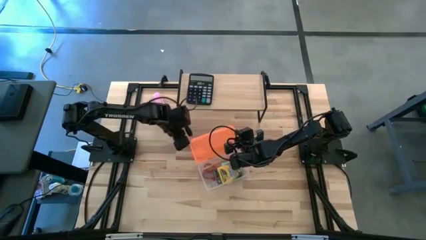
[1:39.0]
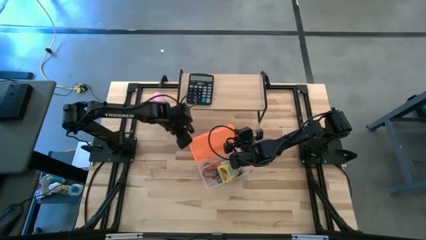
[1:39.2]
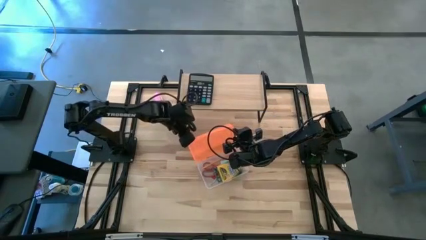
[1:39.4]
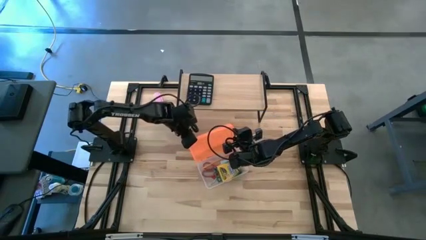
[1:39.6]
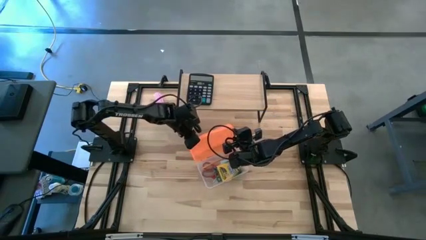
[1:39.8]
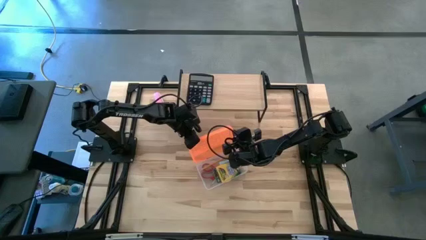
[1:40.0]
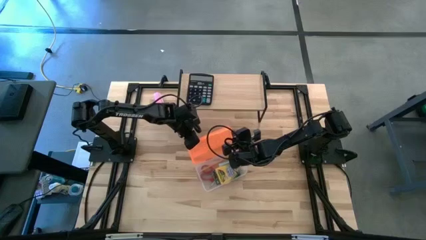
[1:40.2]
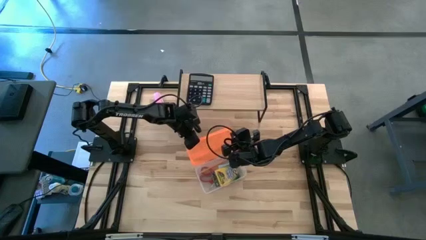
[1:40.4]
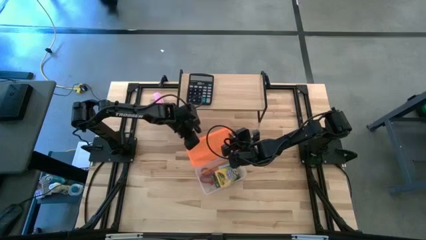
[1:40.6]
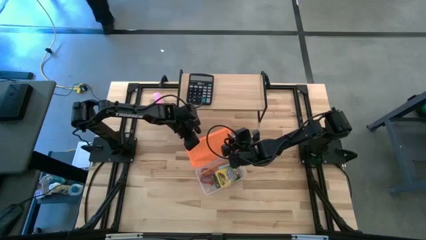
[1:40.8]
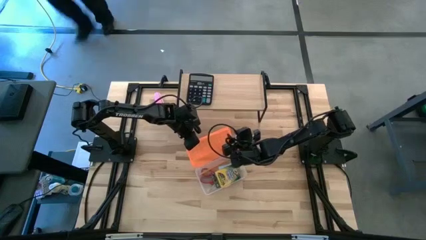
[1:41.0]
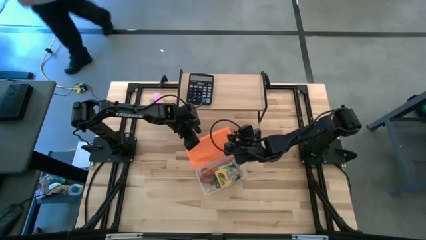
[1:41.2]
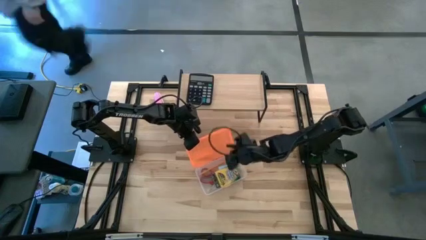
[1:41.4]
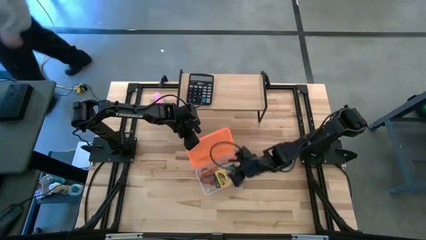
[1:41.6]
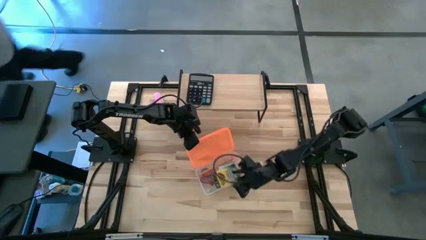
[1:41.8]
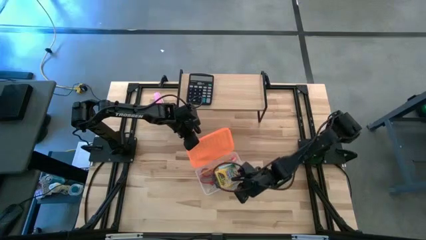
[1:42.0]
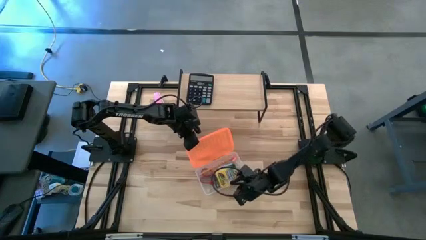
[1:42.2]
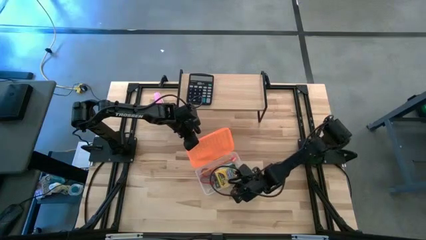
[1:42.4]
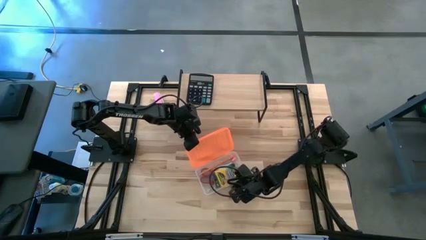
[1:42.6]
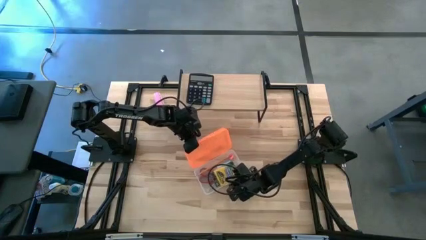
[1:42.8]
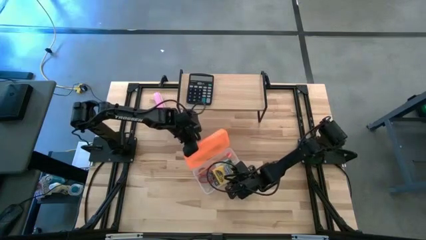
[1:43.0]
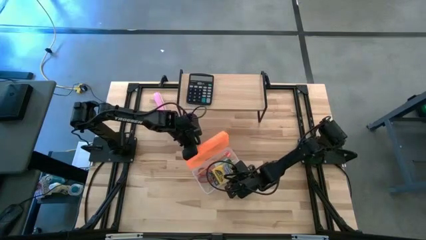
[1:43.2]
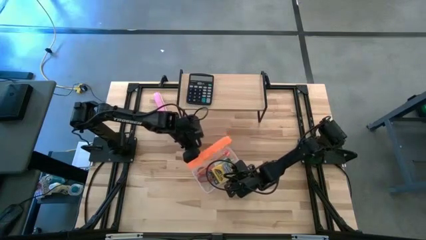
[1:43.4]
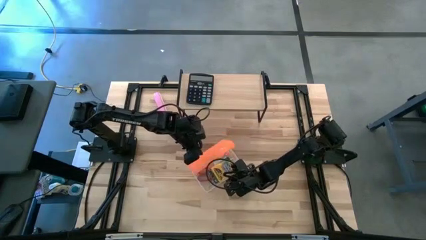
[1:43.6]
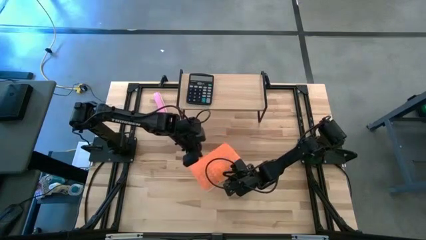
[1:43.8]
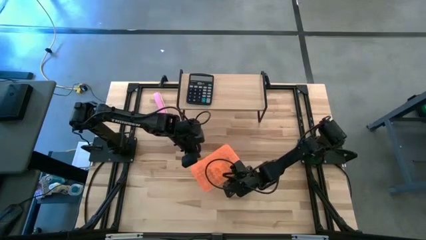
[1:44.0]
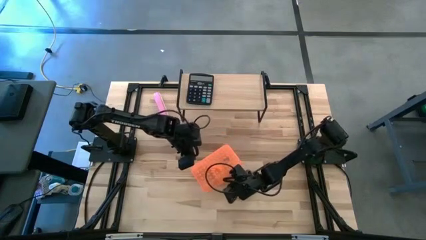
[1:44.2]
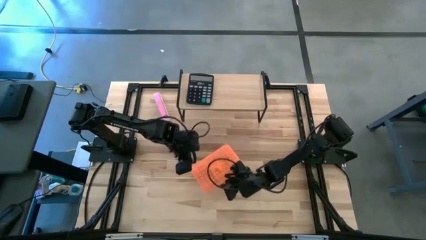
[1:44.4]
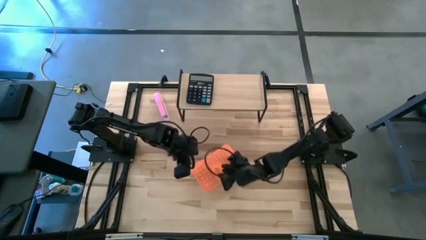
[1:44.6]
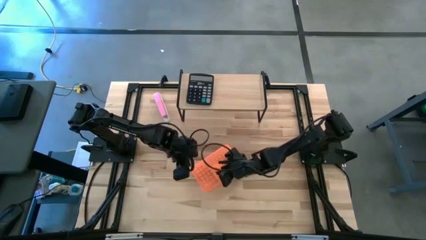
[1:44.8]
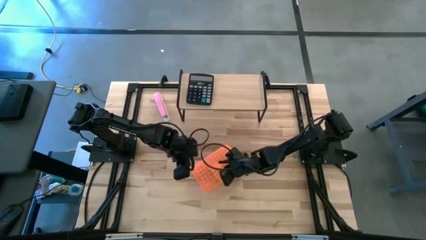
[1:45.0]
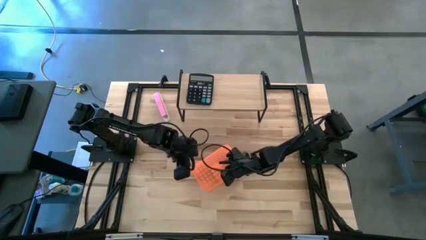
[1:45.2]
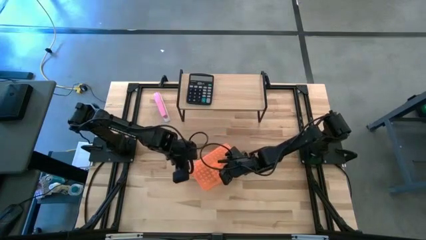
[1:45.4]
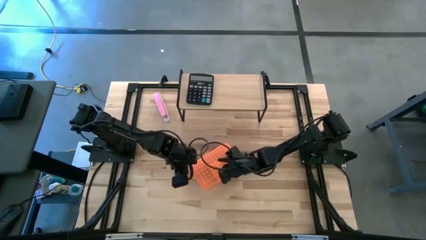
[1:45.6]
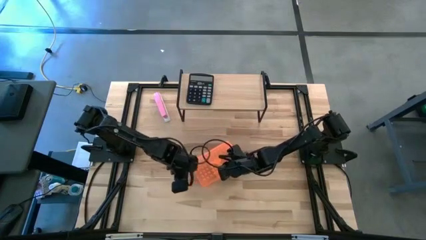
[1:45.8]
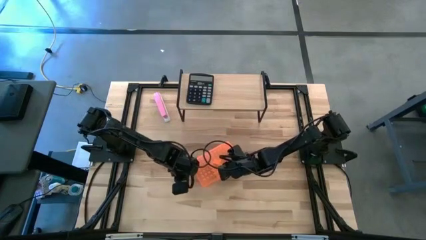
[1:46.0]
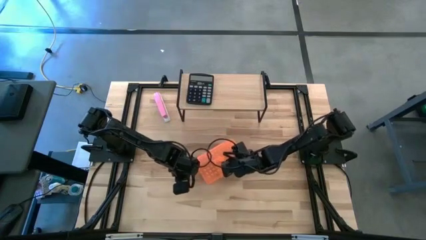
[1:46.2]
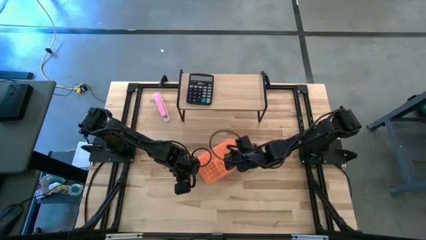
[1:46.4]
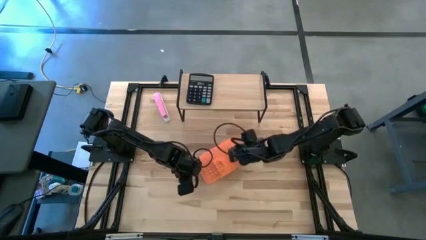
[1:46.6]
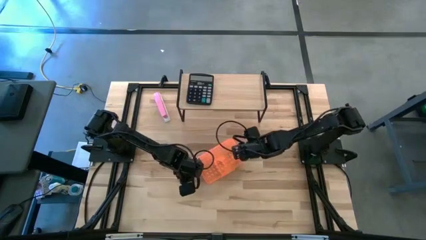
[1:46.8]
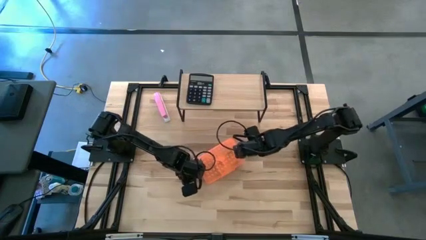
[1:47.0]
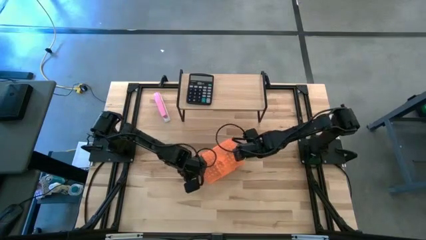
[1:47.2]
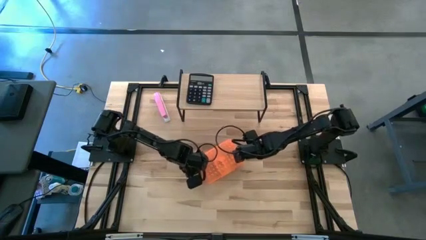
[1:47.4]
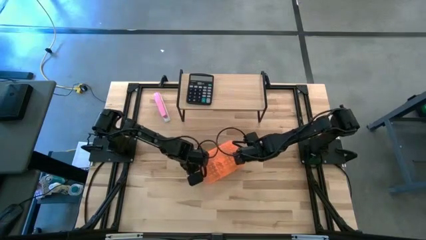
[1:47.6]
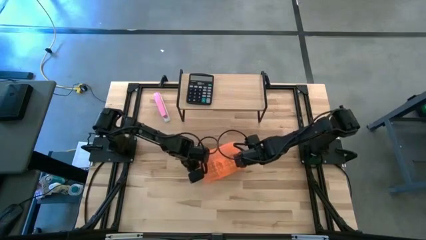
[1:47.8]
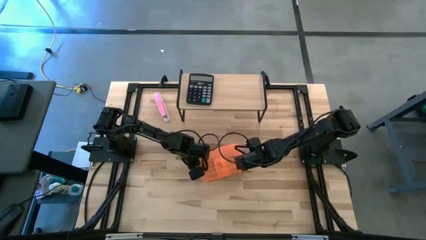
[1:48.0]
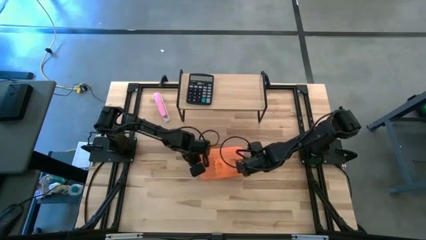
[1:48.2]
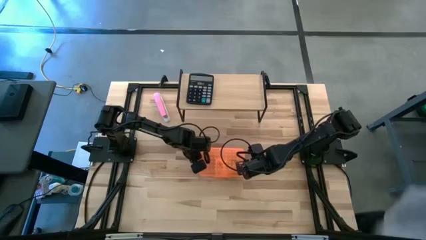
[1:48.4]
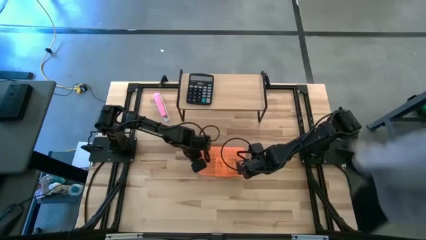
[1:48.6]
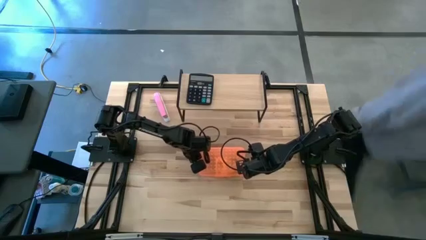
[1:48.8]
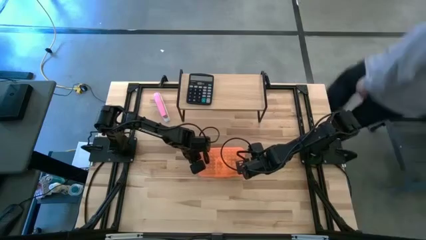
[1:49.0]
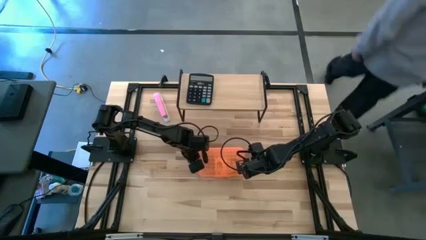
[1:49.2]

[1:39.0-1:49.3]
Task: Pack school essentials
Close the orange supply box

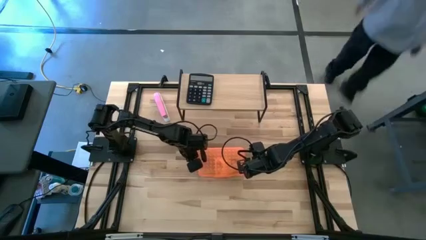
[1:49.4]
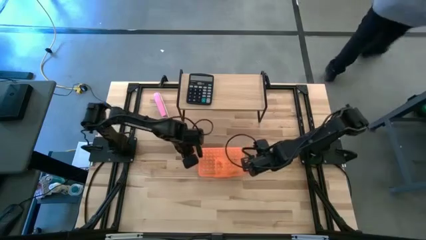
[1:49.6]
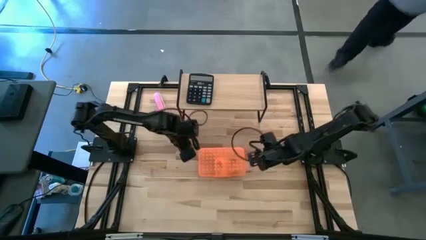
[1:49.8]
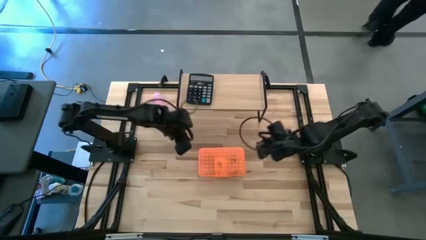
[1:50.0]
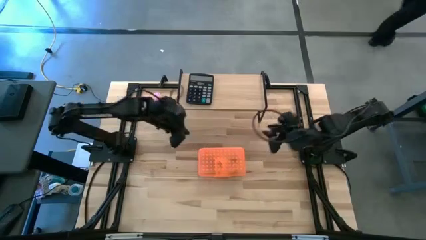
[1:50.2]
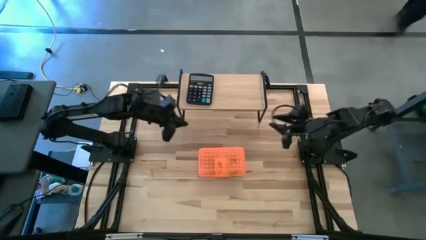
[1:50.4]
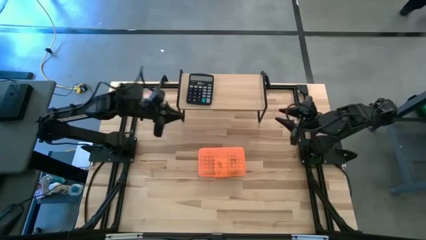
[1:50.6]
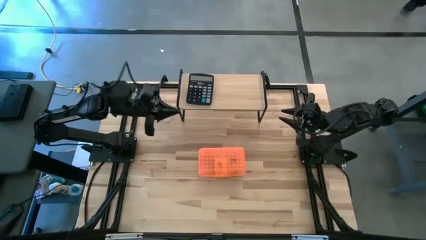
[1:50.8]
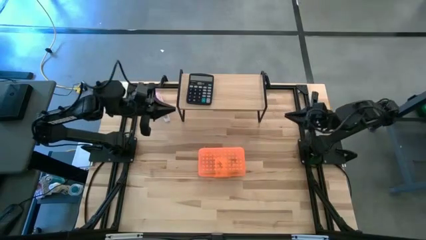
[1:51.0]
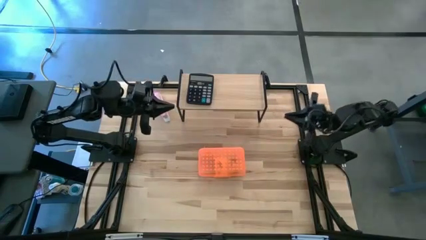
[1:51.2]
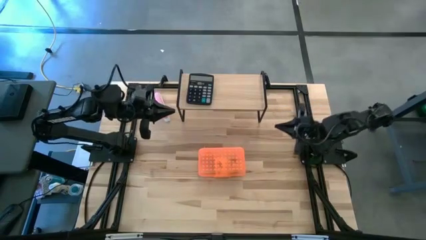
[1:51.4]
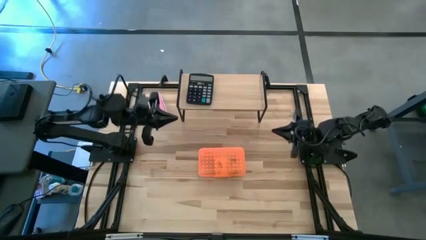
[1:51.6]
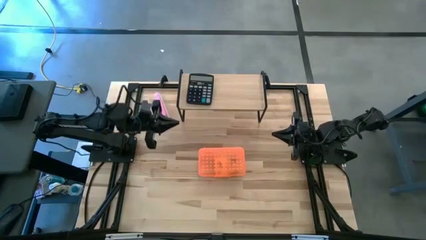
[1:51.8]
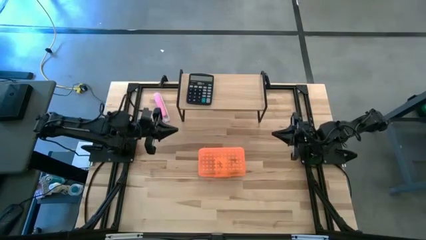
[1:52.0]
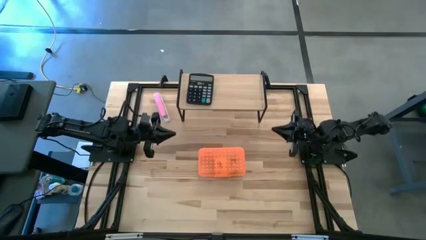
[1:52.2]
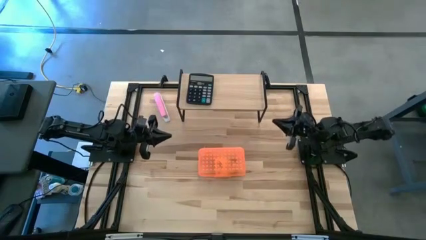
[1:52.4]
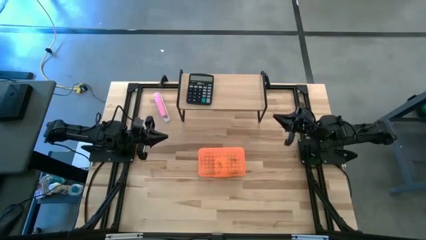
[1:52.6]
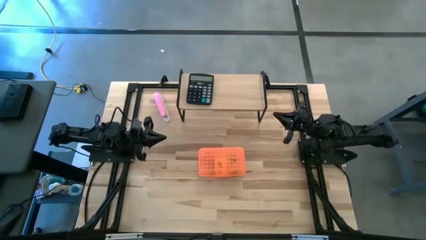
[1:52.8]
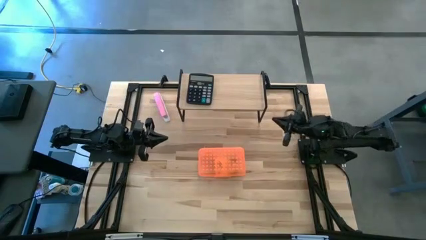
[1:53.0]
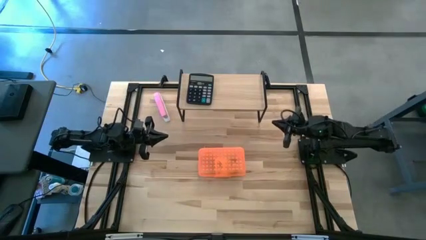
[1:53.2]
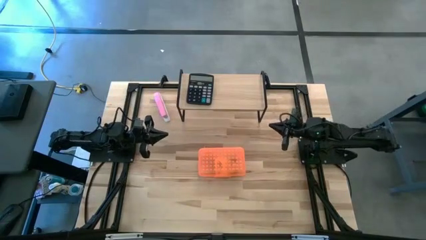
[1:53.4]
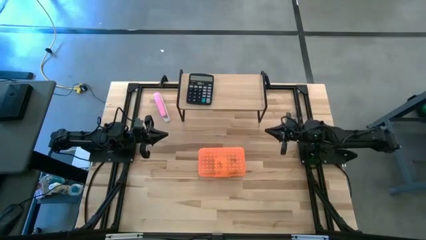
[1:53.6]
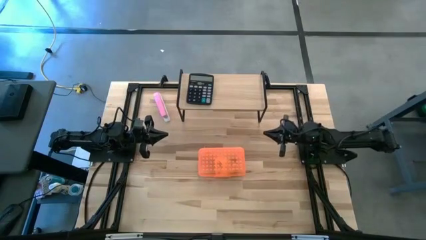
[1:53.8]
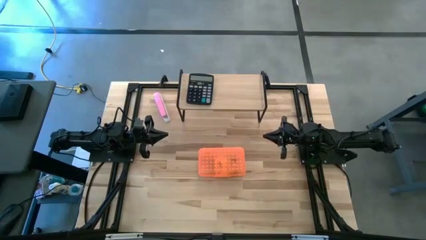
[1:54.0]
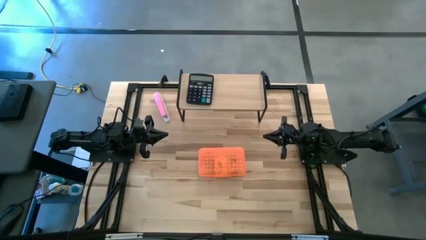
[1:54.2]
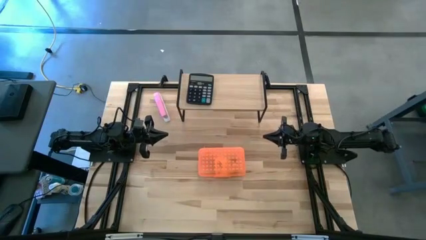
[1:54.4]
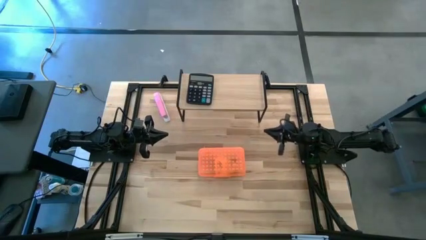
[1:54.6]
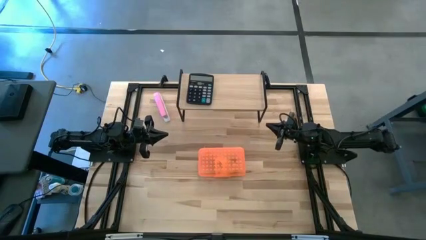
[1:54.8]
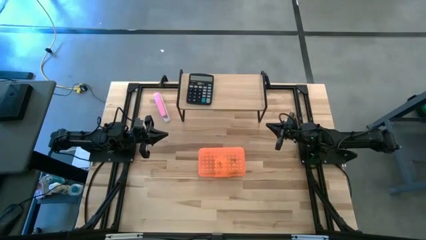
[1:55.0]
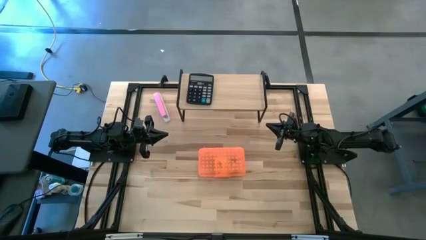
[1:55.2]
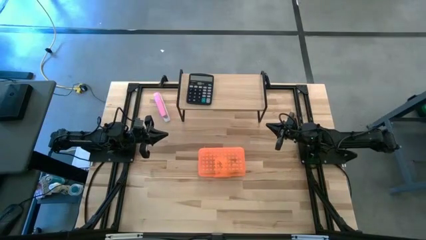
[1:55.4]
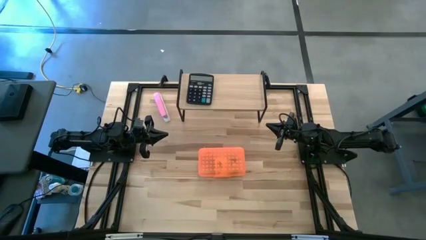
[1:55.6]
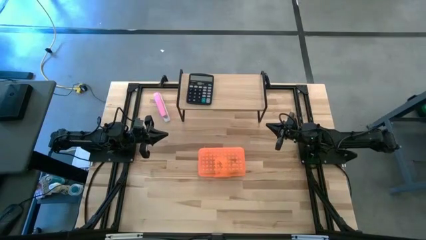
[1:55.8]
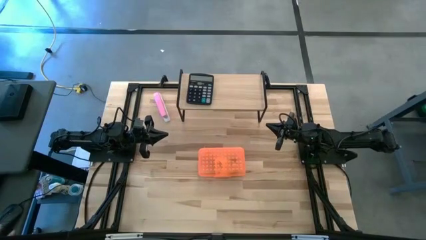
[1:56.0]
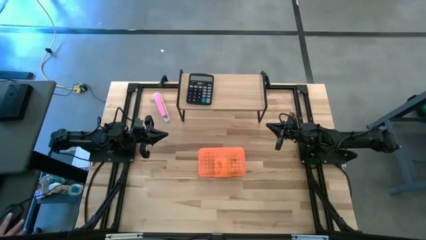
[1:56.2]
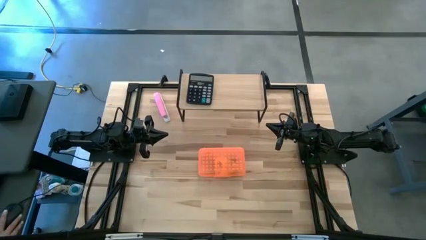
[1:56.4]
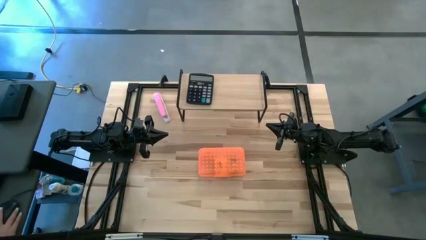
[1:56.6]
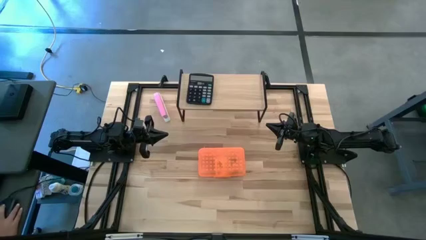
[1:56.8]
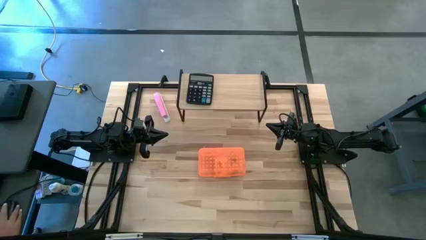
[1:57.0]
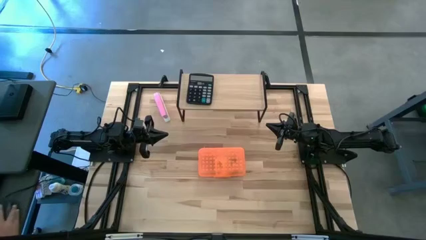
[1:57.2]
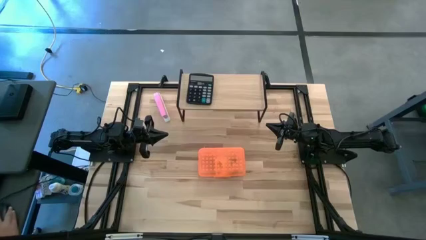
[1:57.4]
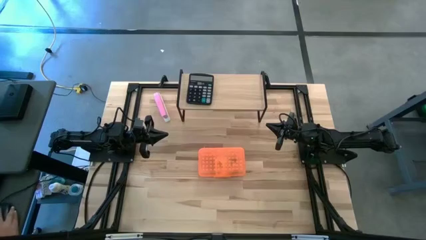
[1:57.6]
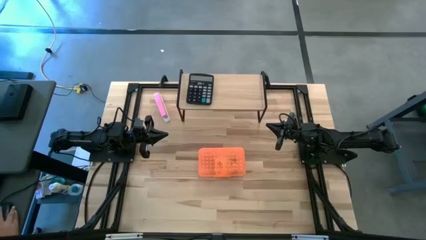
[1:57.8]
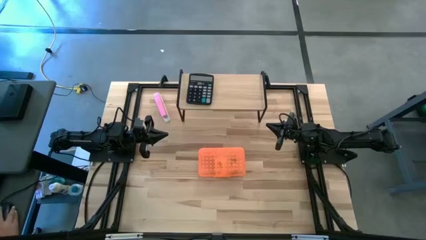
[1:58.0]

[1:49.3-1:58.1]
Return to Home Position
